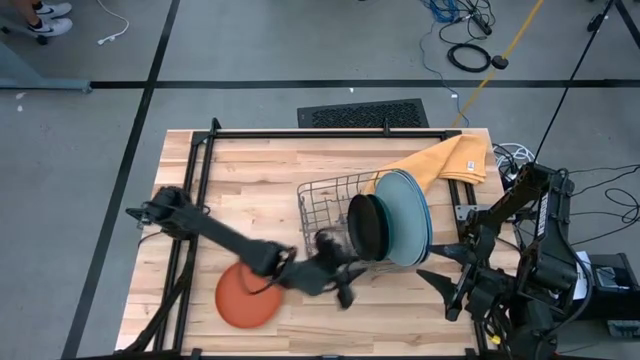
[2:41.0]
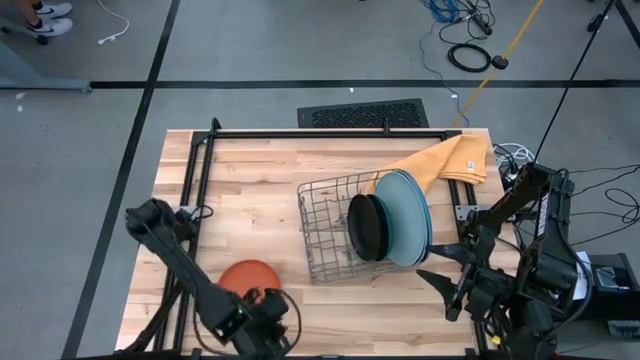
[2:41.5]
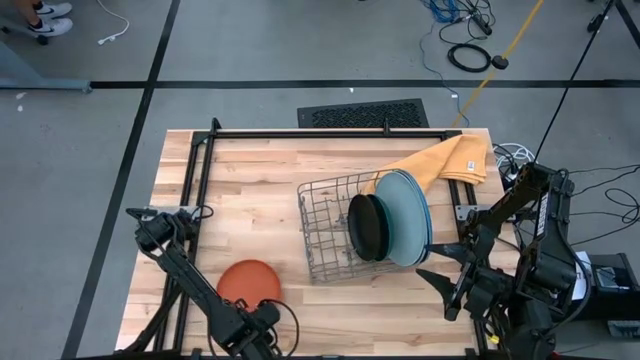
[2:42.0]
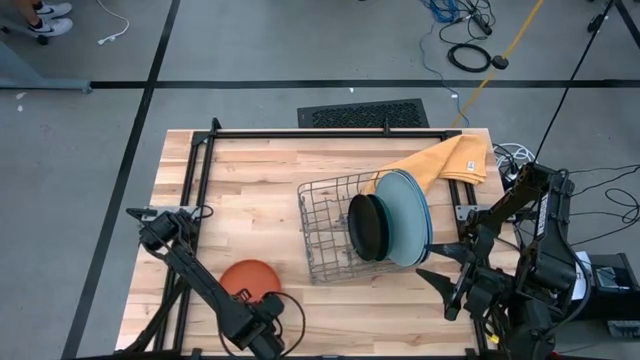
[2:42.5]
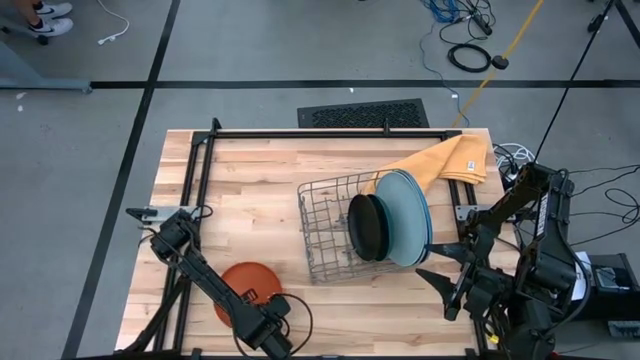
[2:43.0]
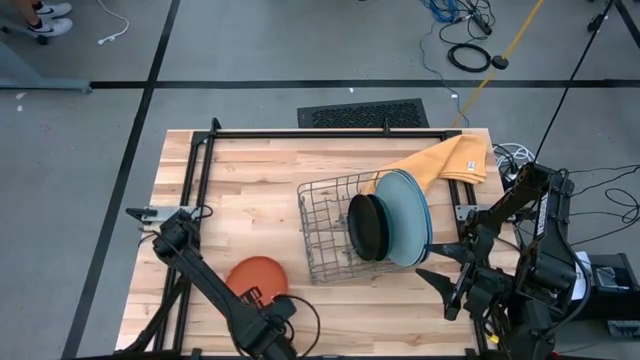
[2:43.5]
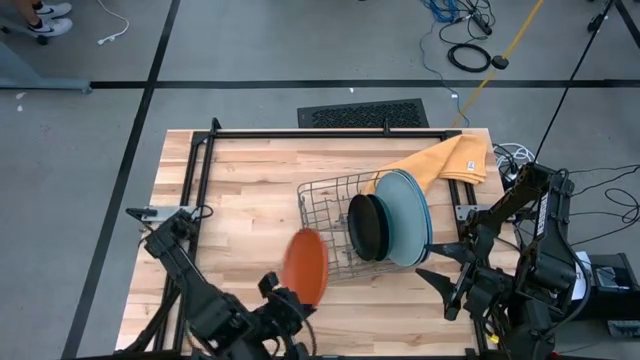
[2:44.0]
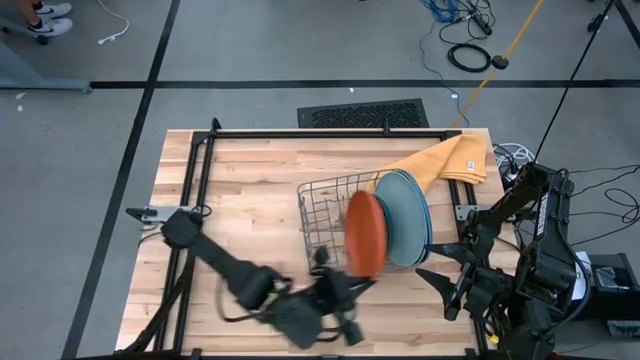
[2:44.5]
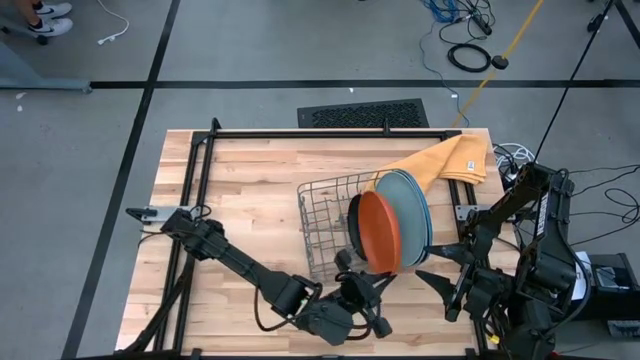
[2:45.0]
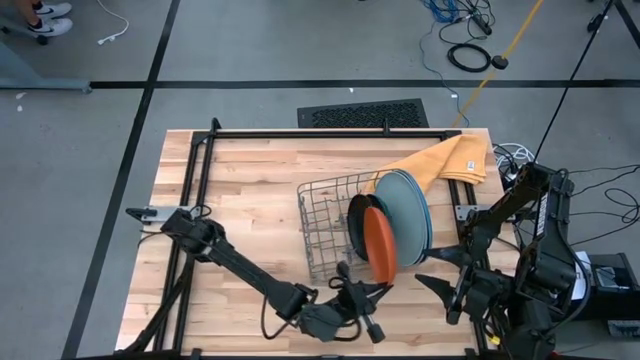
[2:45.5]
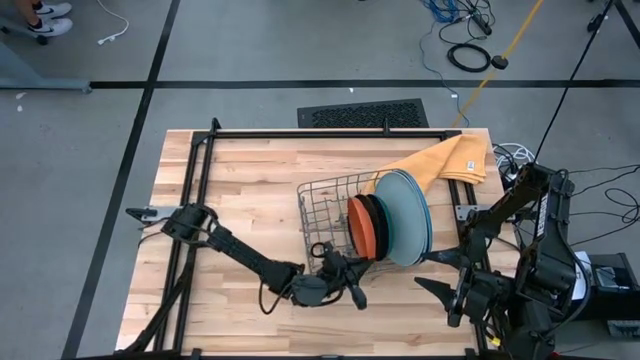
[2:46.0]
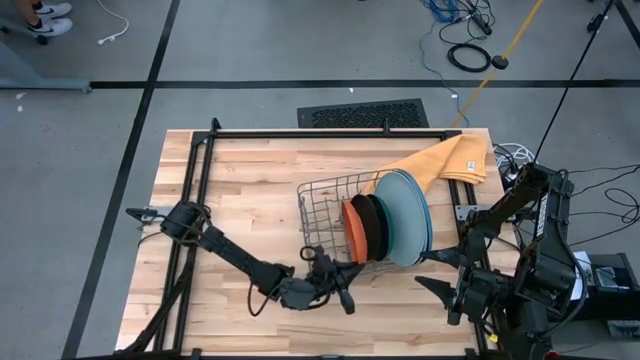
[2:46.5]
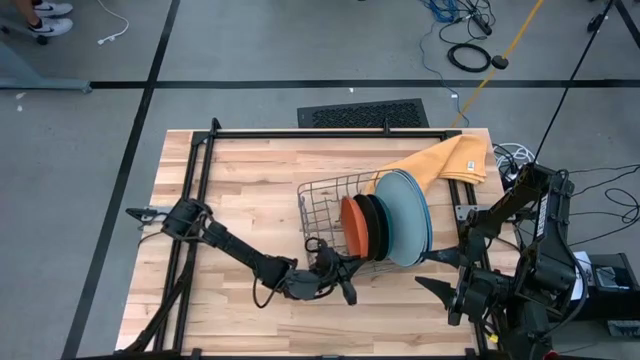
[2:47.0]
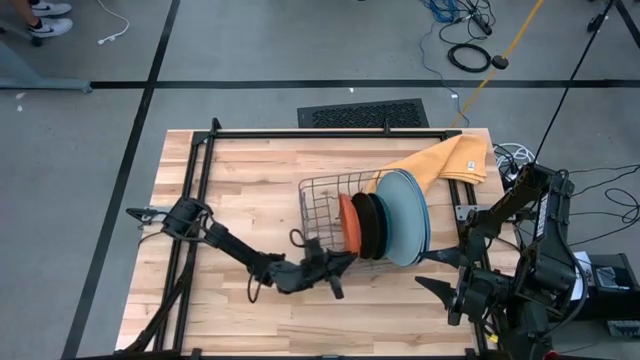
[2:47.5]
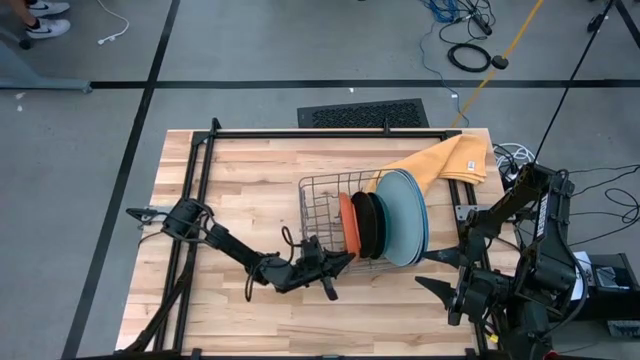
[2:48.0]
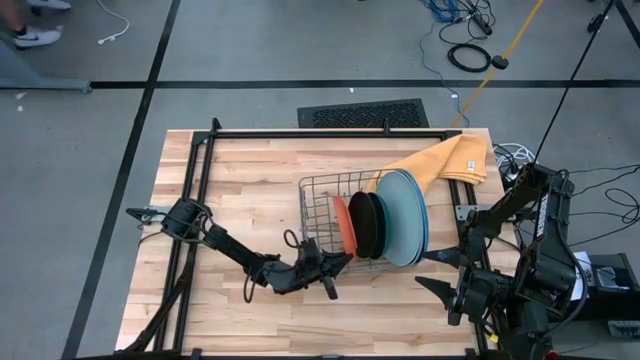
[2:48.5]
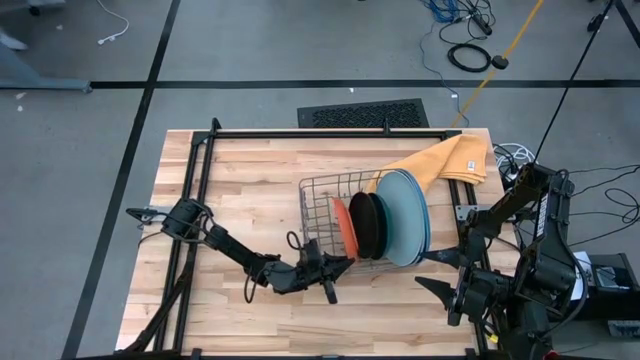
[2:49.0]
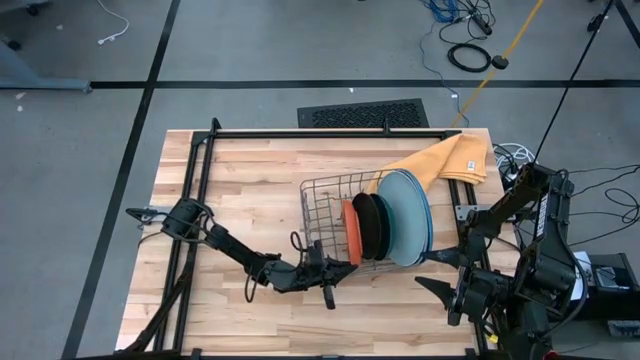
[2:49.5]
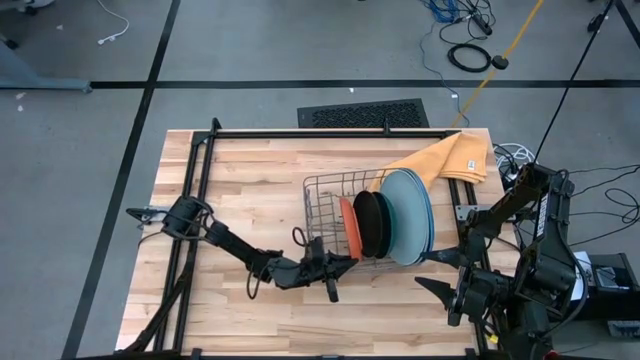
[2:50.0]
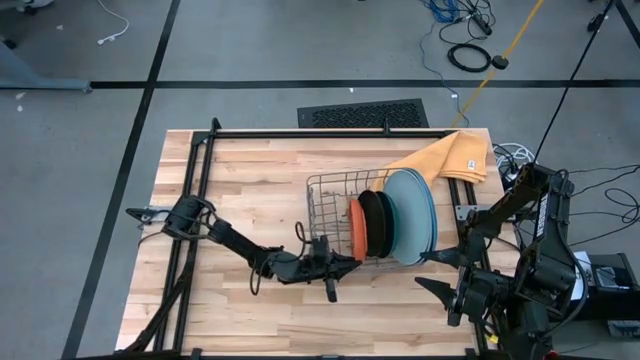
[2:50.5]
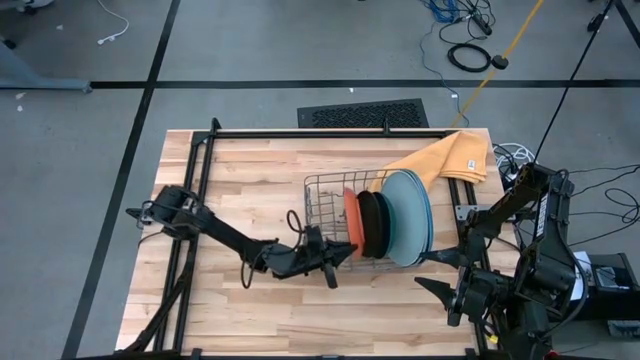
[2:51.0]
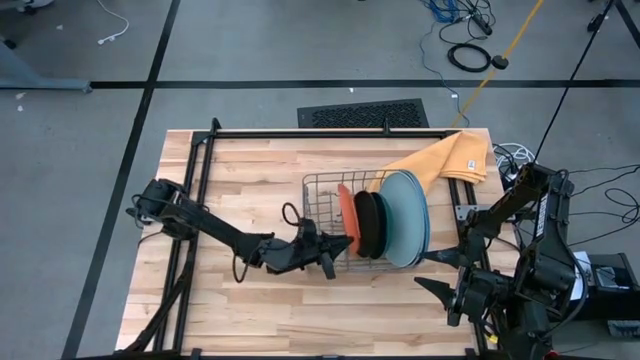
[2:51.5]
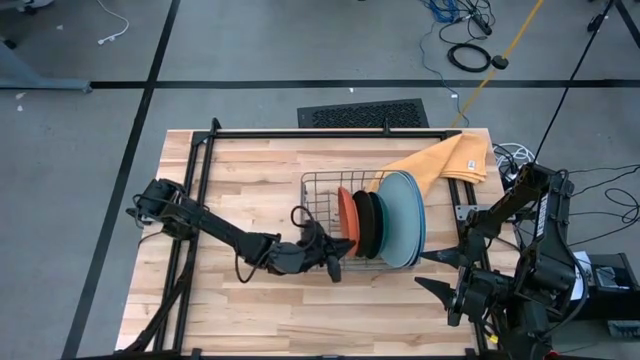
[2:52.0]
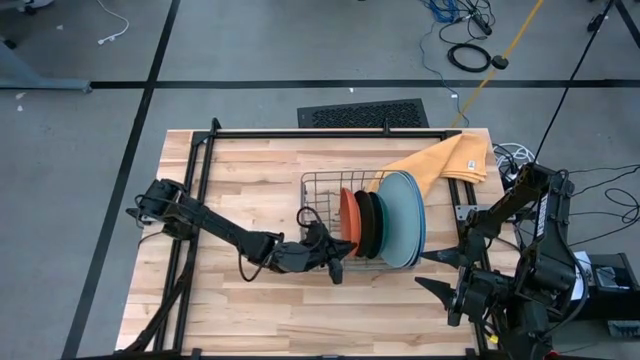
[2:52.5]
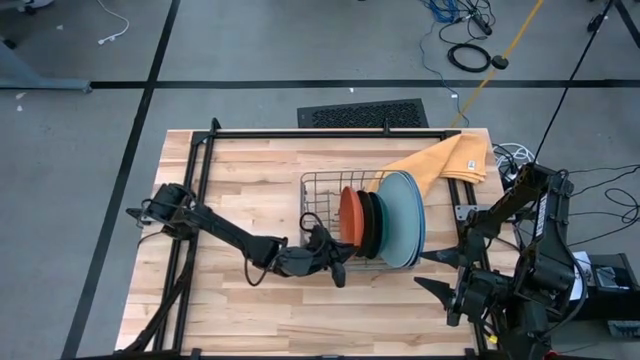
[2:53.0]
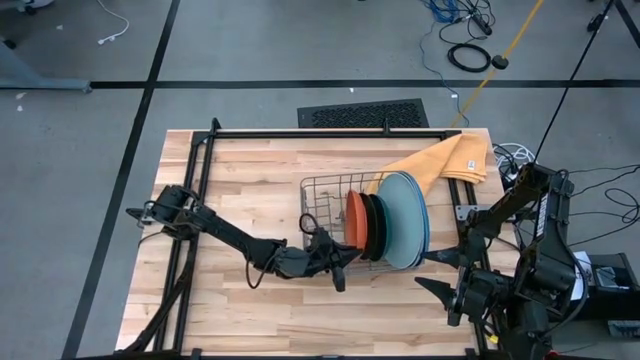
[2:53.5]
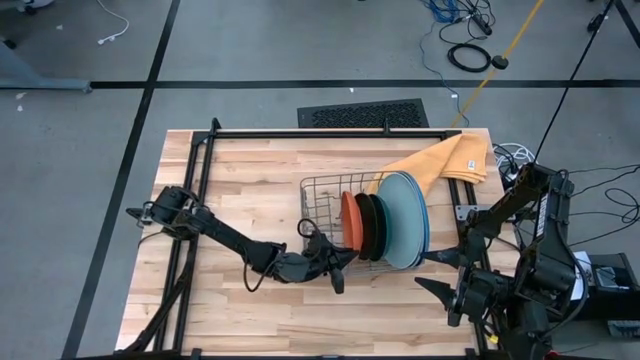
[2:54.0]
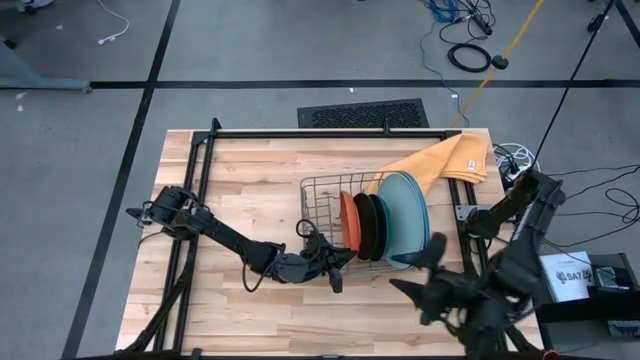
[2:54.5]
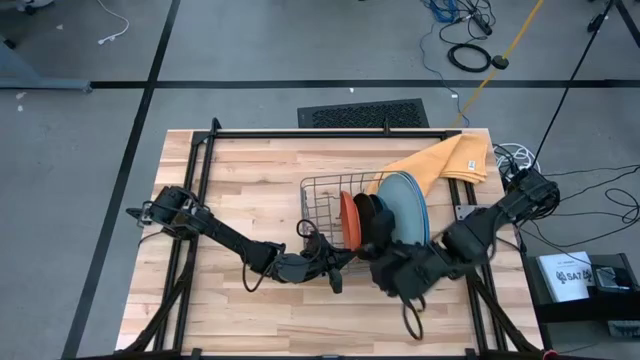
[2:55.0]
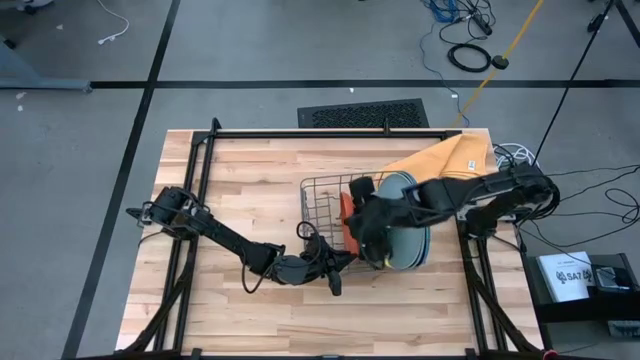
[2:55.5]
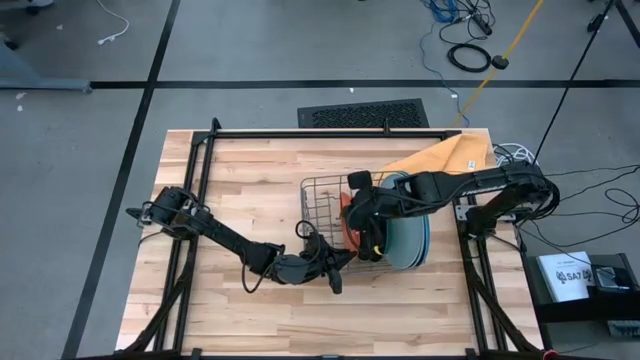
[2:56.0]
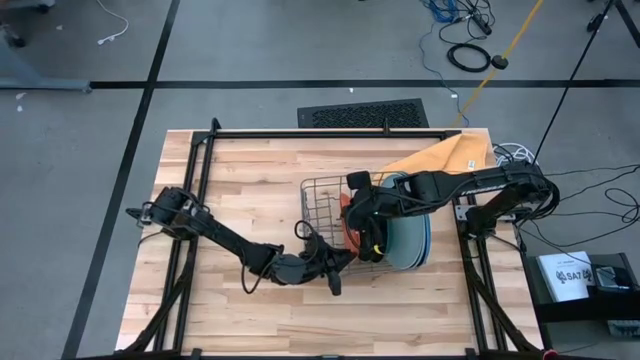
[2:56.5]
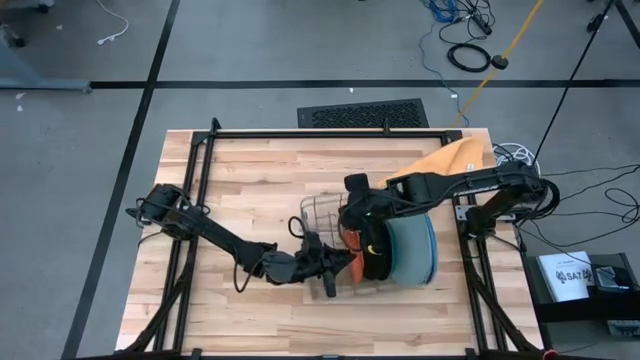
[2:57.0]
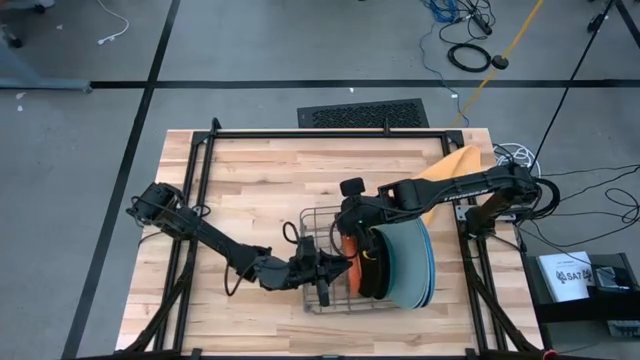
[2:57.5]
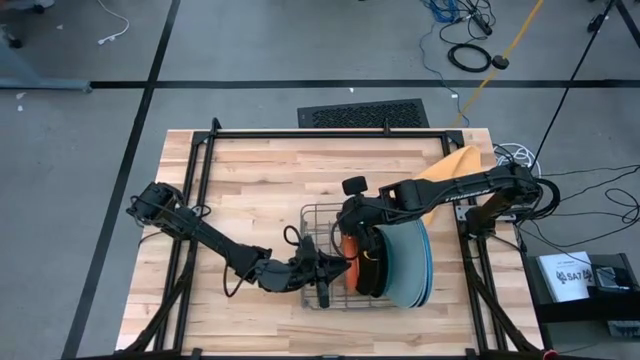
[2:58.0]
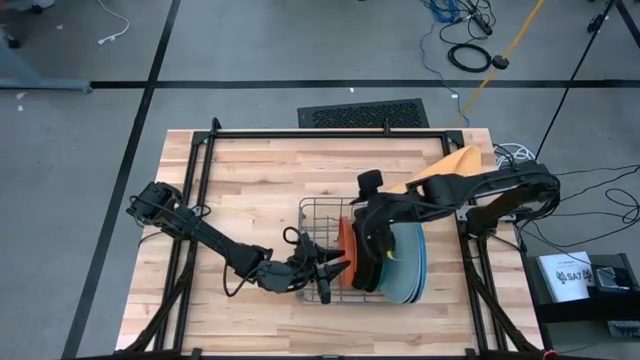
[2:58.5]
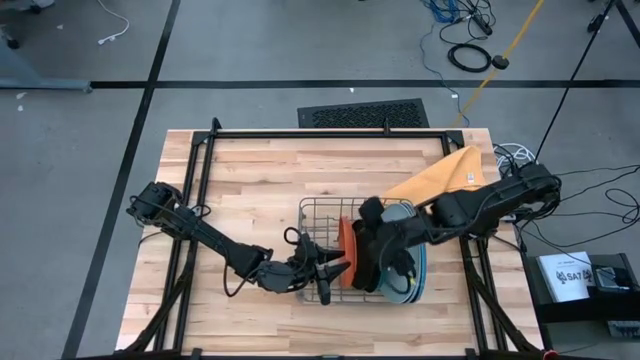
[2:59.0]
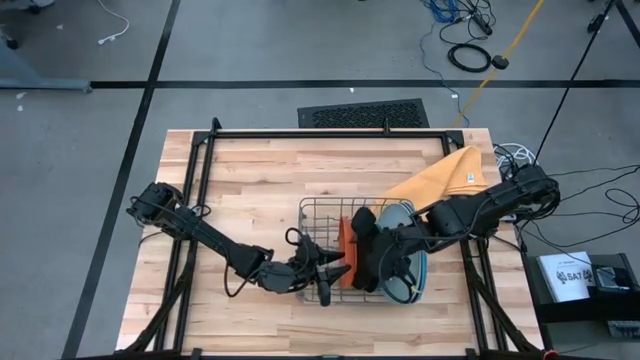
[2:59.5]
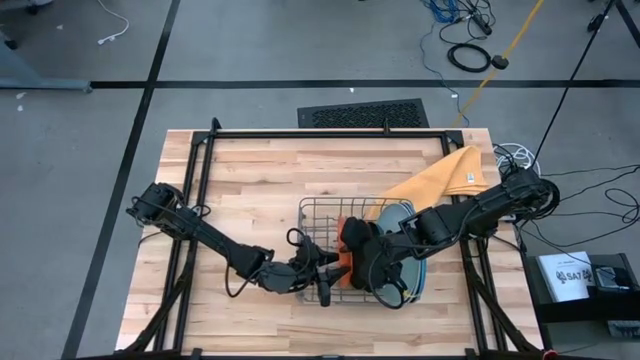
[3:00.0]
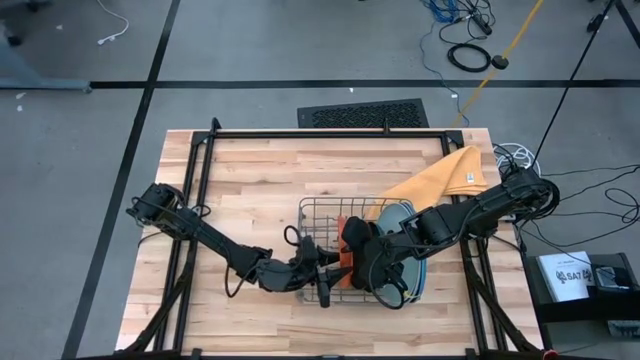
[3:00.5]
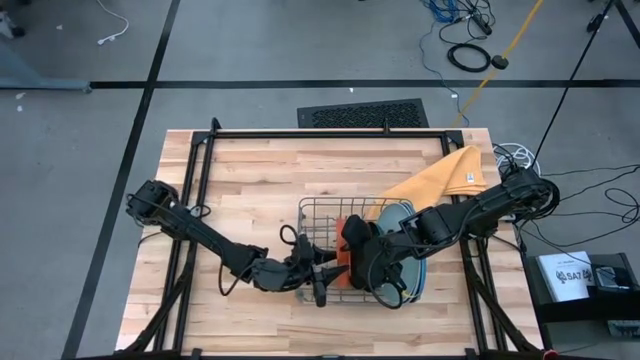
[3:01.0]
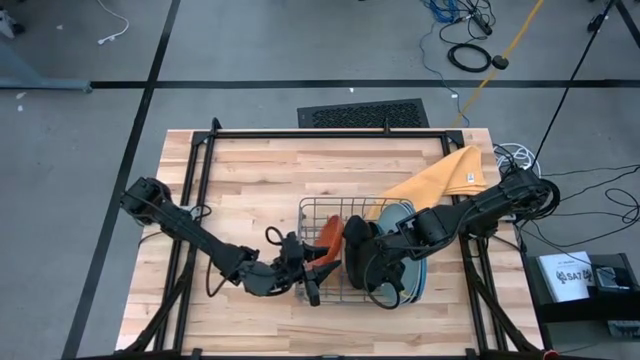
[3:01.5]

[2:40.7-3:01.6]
Task: Sort dishes
Put the orange plate into the green dish rack

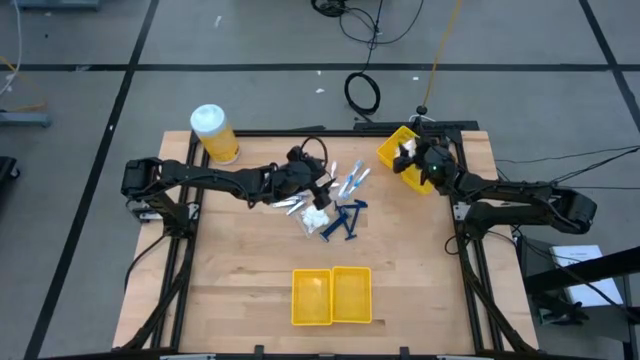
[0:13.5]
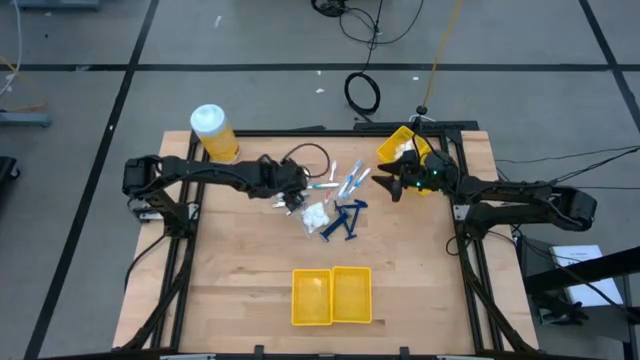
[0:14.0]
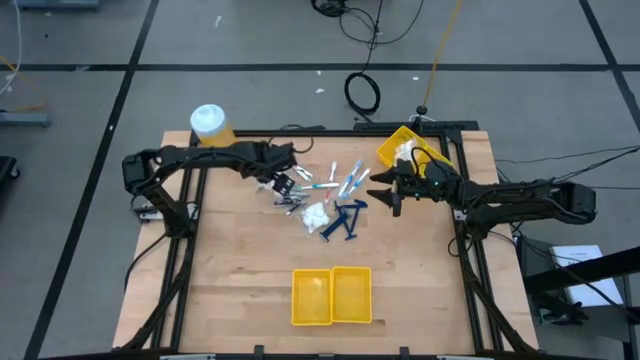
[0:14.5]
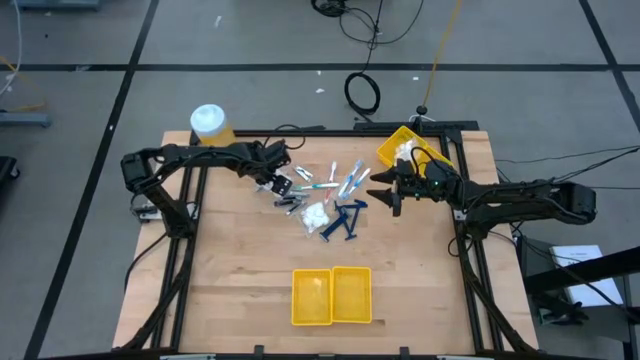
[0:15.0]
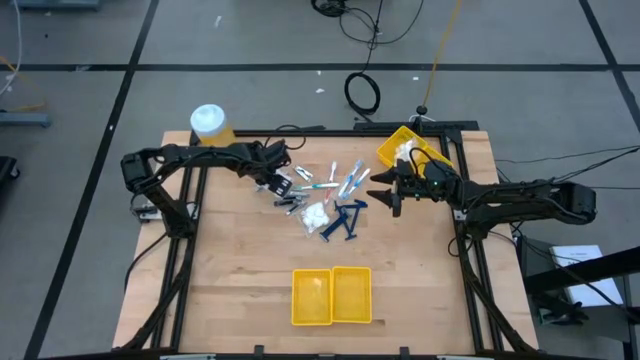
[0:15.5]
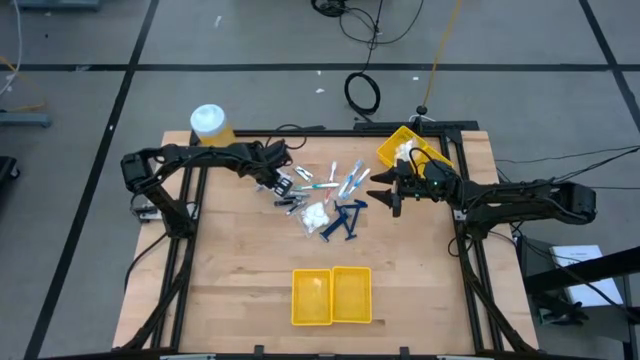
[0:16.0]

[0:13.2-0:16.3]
Task: Pick & Place Travel size toiletries
Put the top white cotton pack into the top left yellow bin
